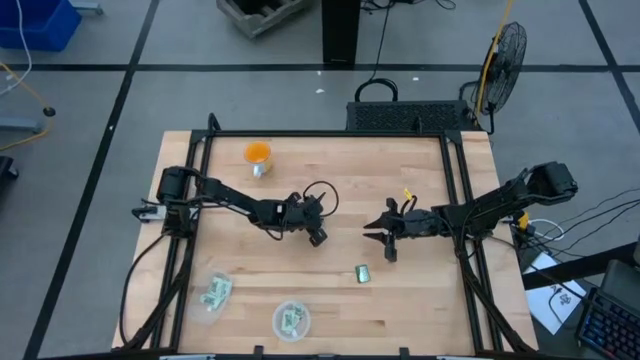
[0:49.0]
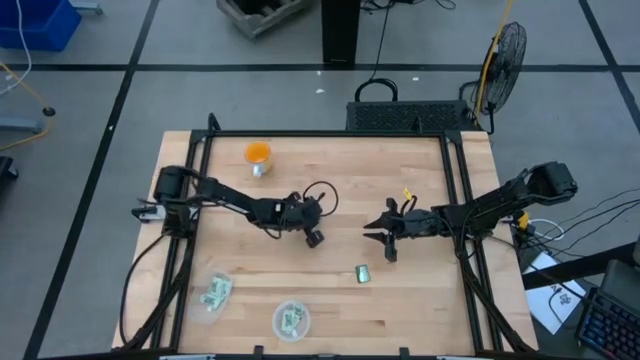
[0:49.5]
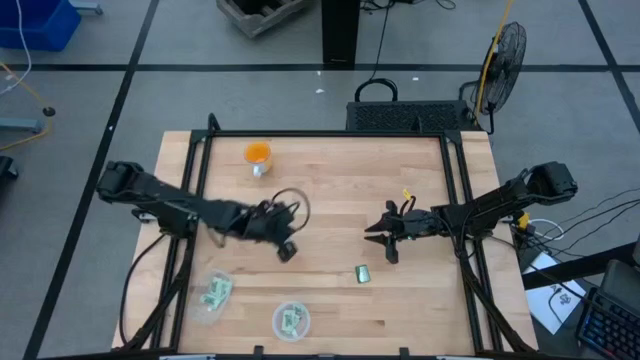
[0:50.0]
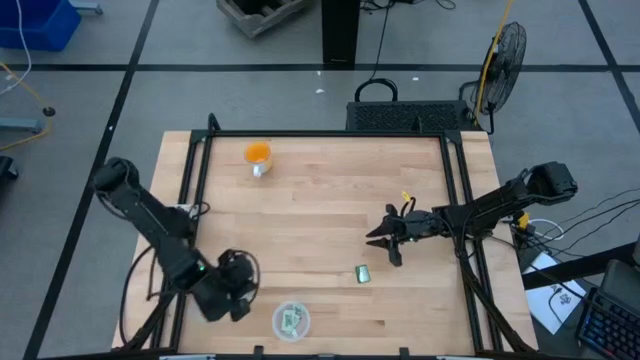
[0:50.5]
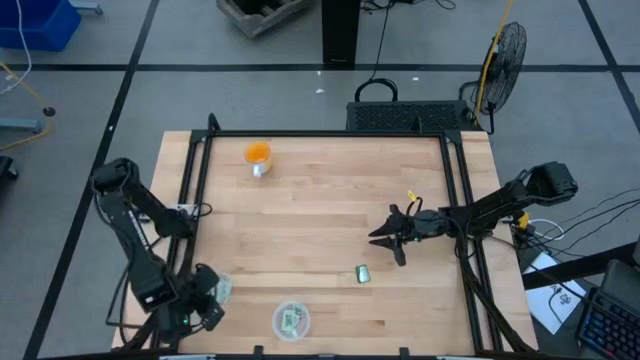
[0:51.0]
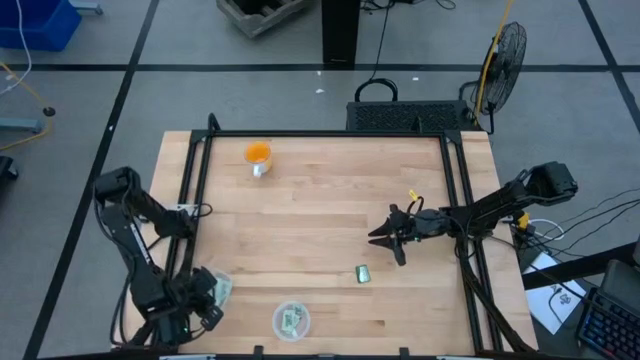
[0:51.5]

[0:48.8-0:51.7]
Task: Pick and place items into bin
Put the stevia packet into the left transparent bin

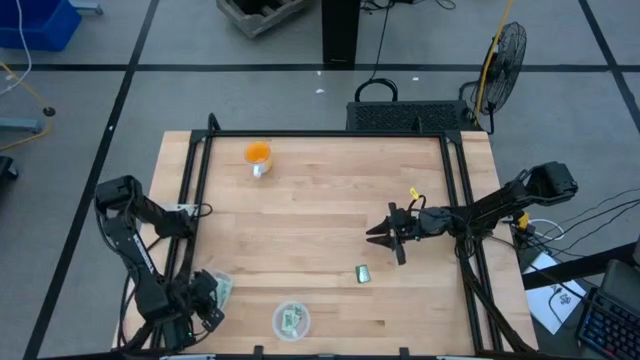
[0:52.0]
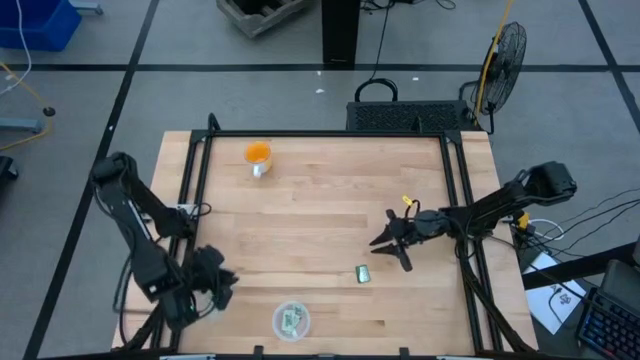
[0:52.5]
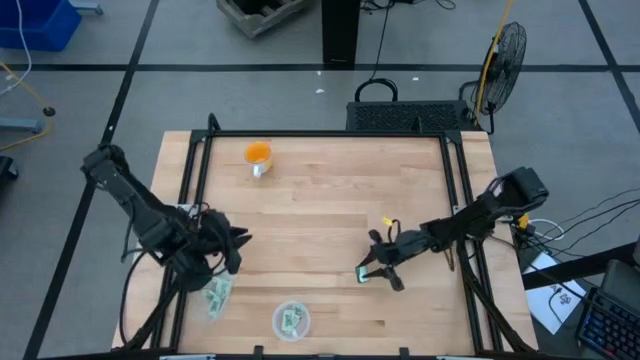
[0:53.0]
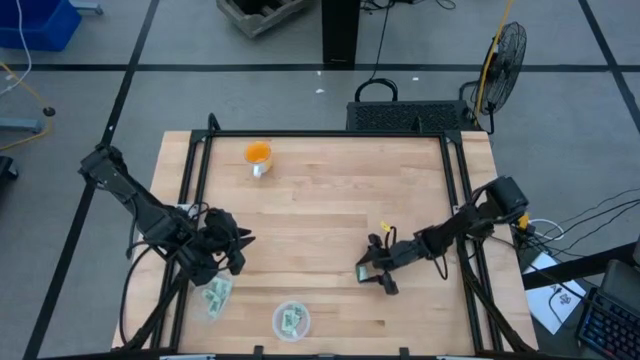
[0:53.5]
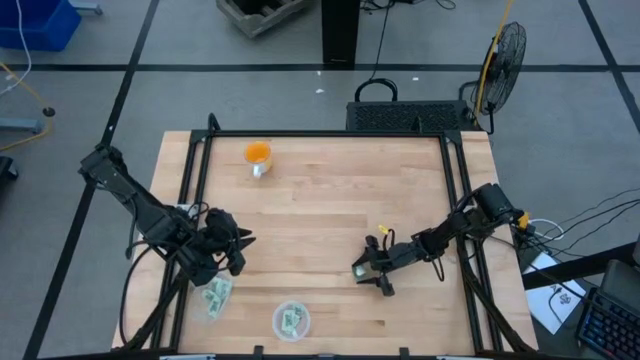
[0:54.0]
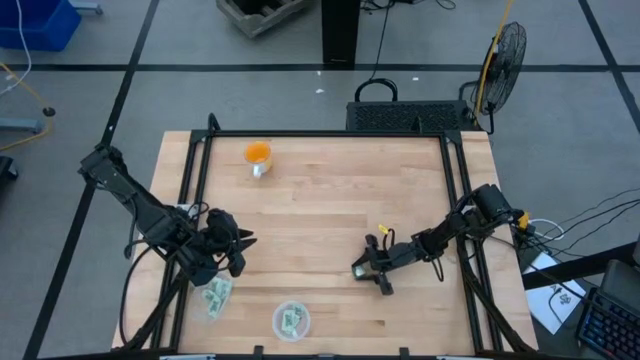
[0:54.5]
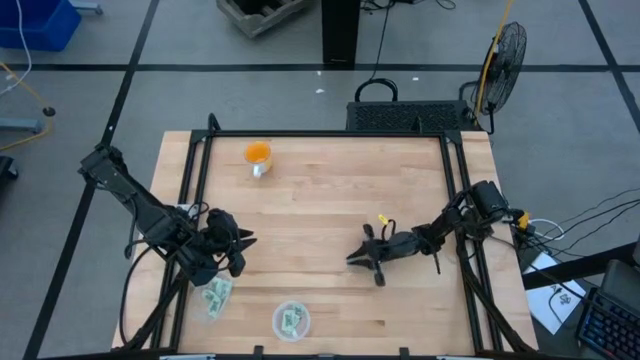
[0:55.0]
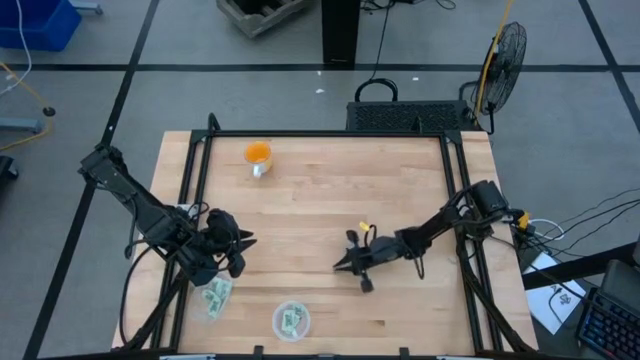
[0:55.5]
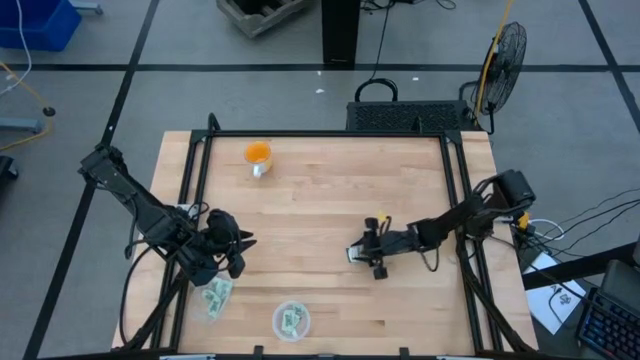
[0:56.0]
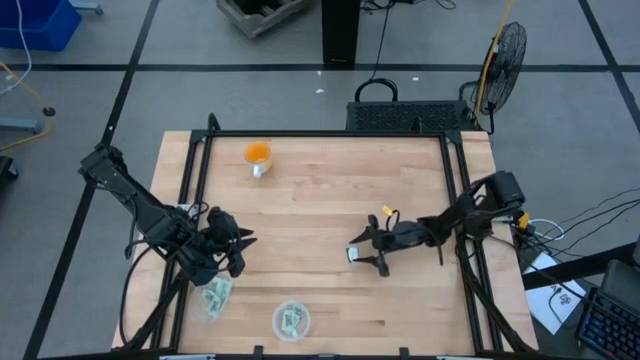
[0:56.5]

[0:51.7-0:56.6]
Put the truvia packet into the right transparent bin

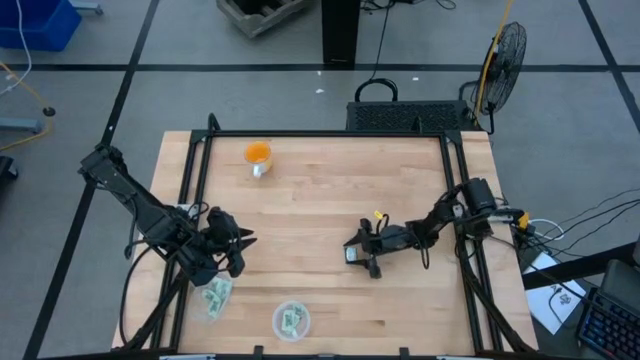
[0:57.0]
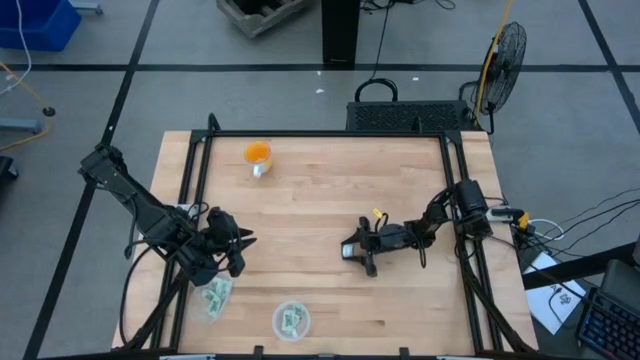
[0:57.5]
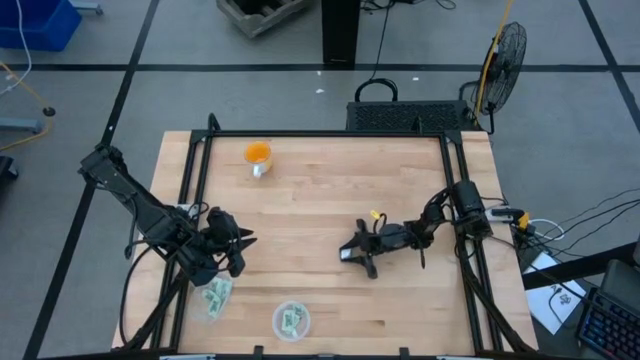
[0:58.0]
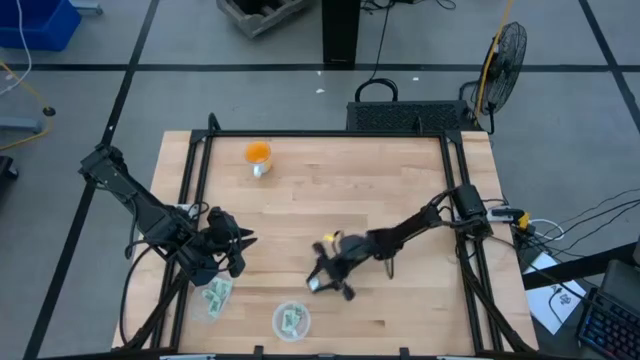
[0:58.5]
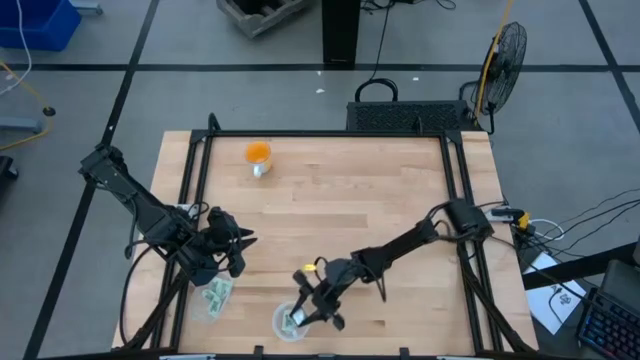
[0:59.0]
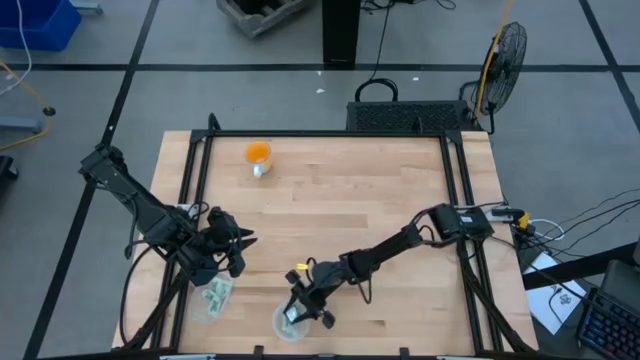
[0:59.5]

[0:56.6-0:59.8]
Put the truvia packet into the right transparent bin

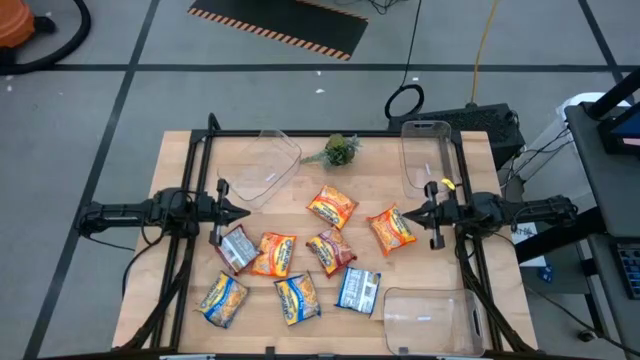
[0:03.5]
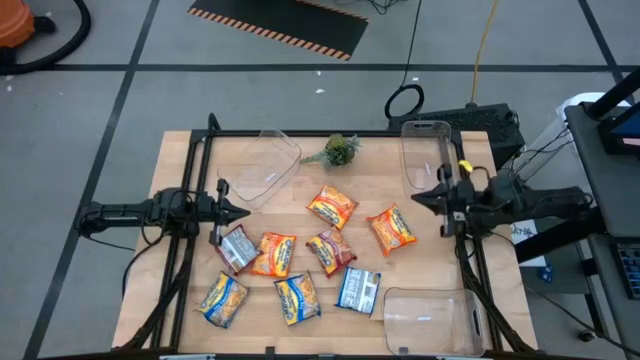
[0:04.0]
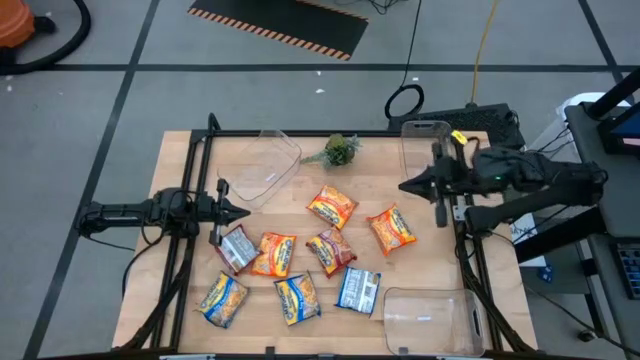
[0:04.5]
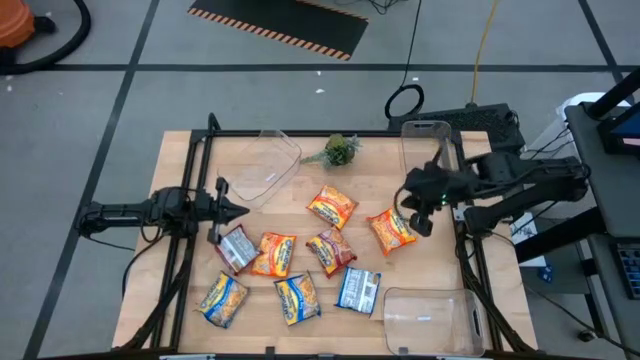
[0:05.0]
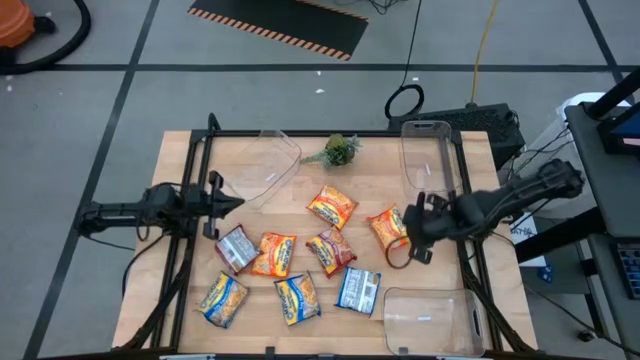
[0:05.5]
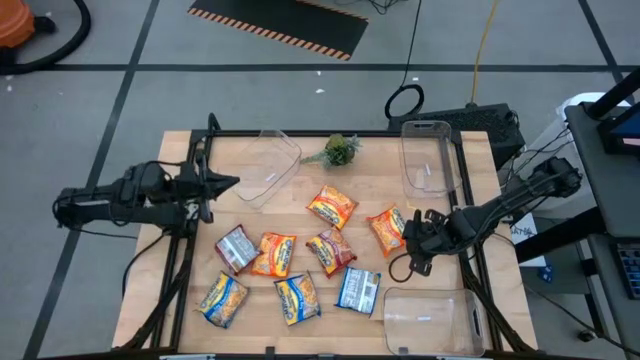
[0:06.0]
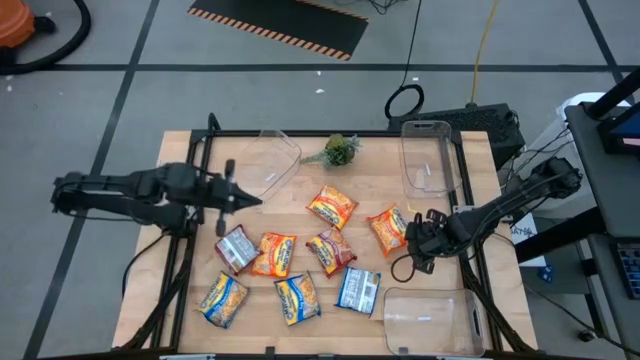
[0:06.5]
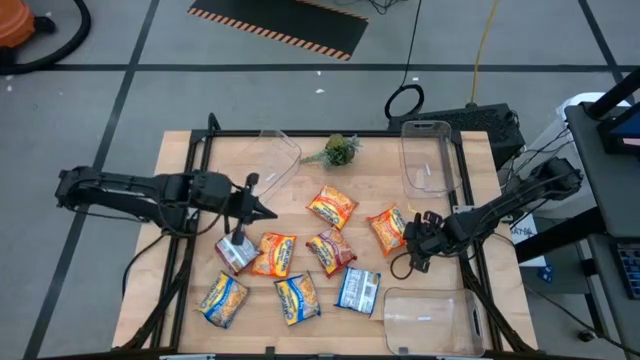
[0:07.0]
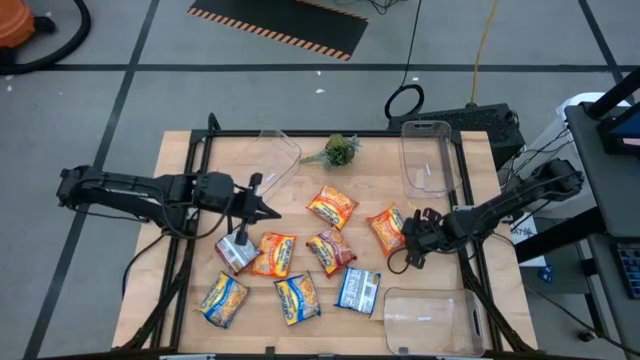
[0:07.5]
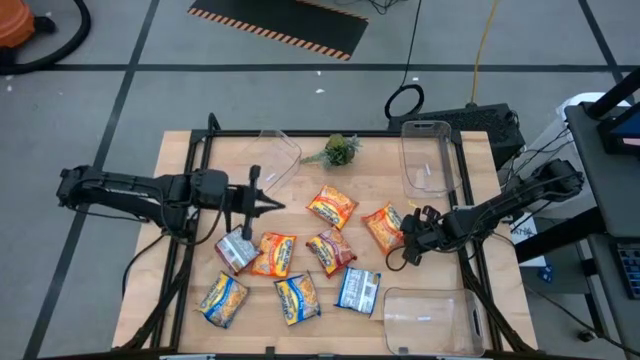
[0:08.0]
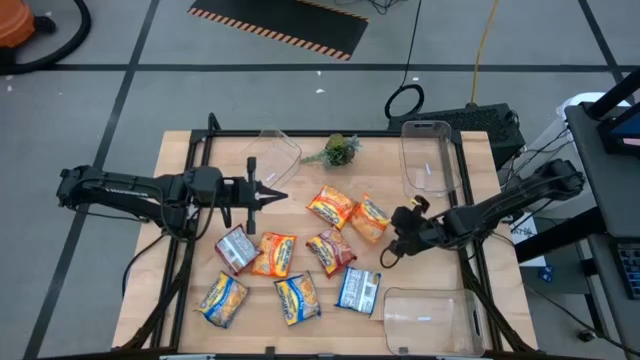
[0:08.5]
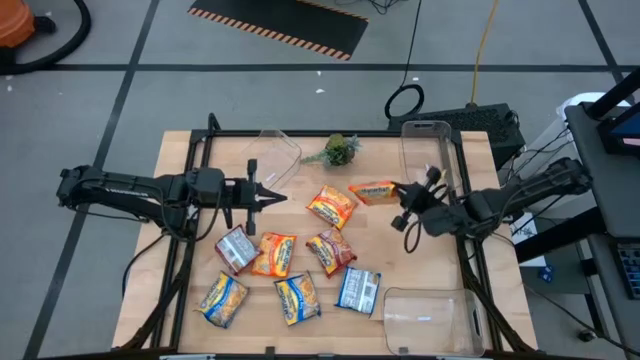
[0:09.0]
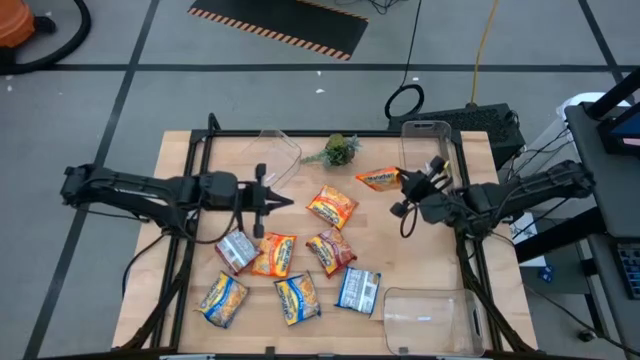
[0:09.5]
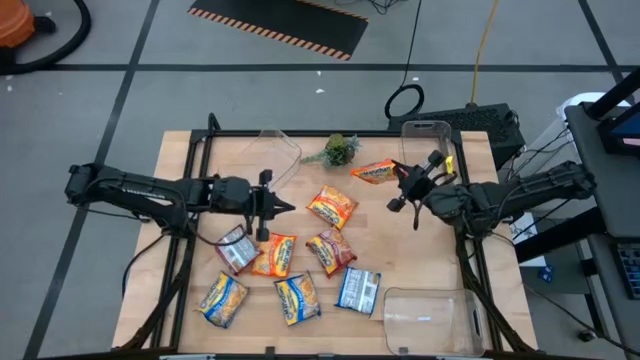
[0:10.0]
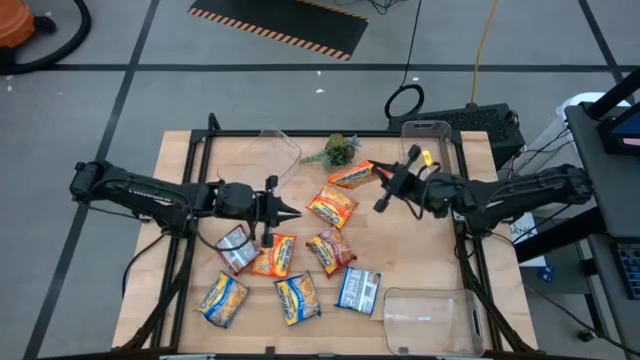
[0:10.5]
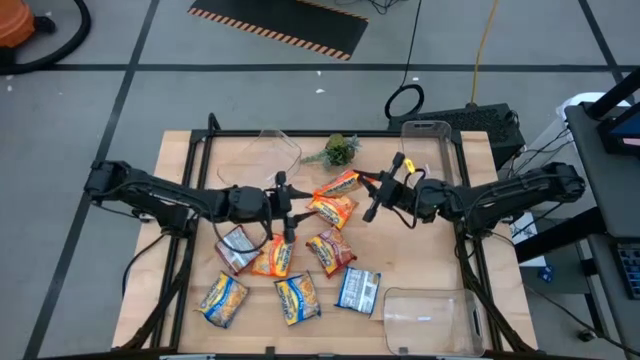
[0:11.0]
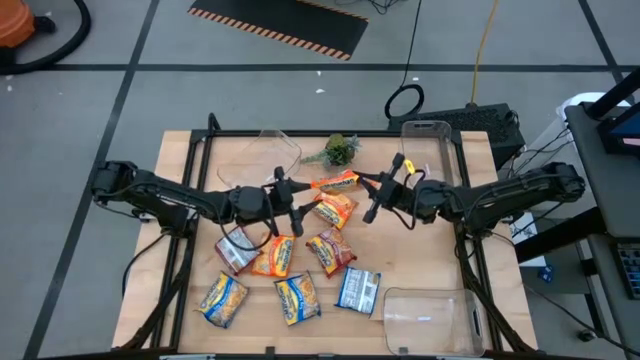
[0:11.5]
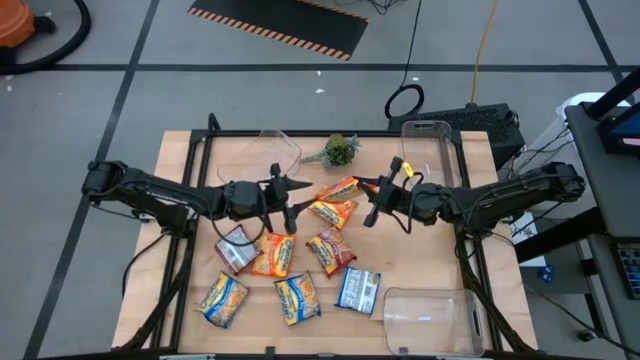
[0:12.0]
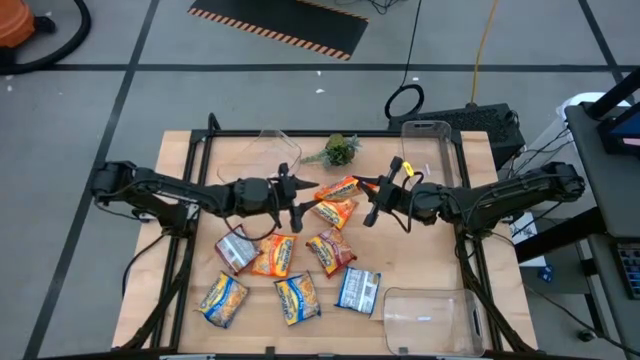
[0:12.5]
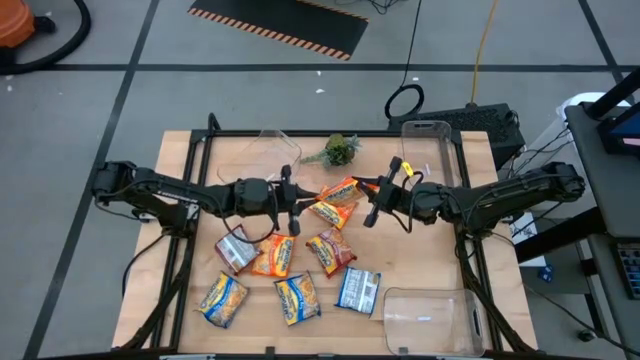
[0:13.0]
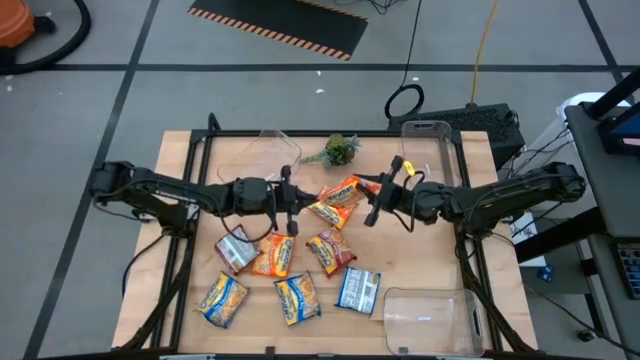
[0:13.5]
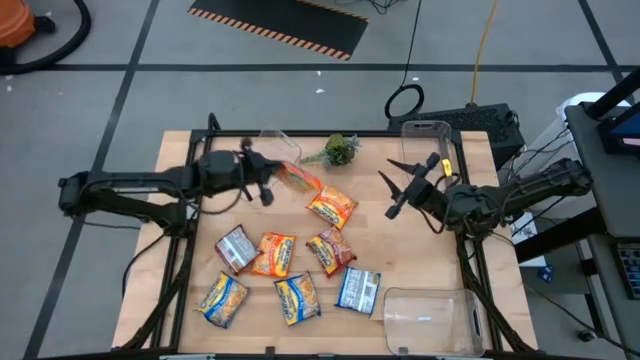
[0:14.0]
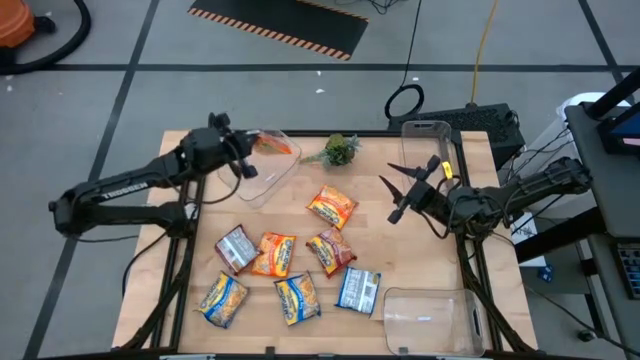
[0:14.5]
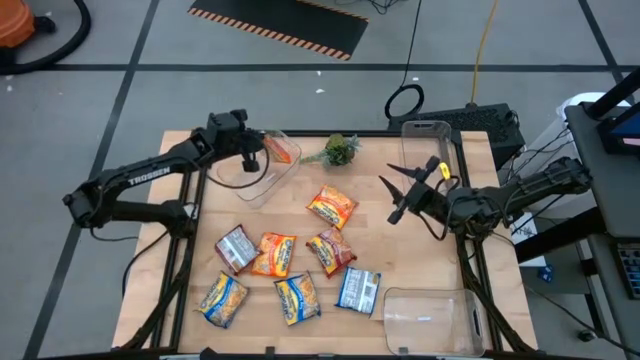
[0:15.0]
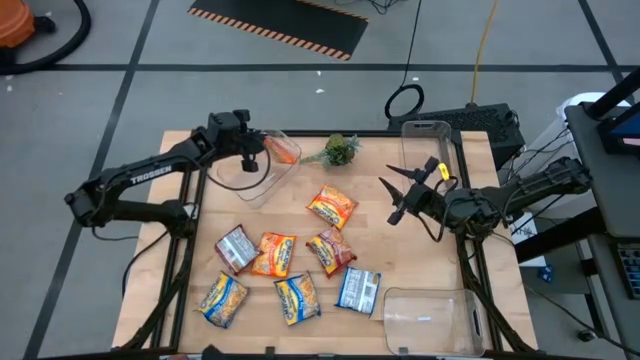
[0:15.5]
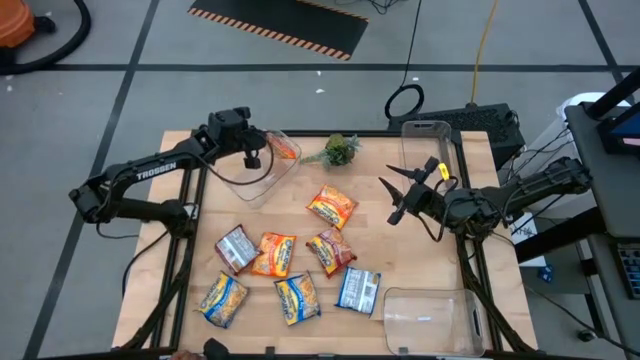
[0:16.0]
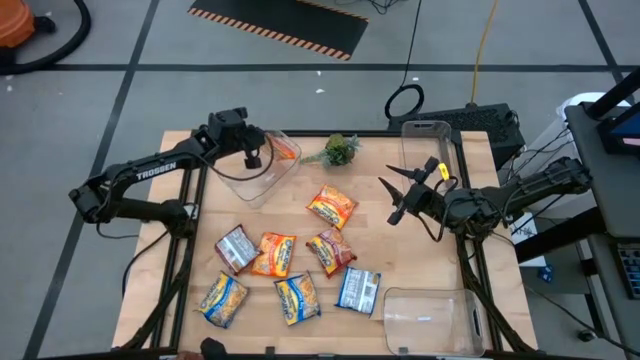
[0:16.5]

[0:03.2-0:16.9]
Task: Sort Maruchan noodles
Put the top right orange noodle pack into the top left transparent bin
